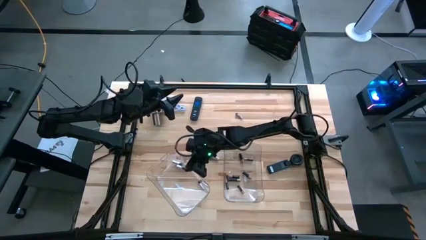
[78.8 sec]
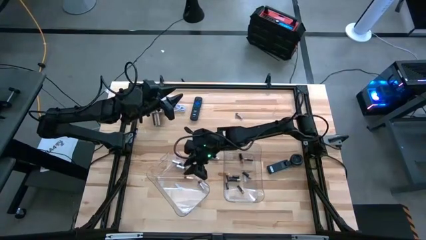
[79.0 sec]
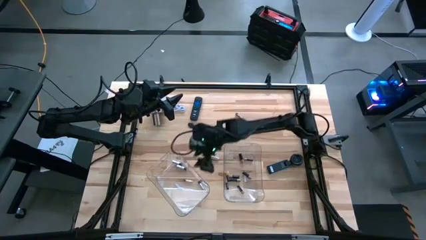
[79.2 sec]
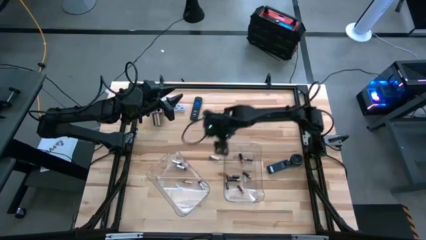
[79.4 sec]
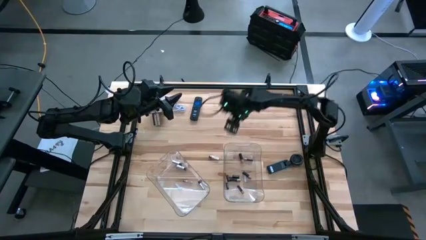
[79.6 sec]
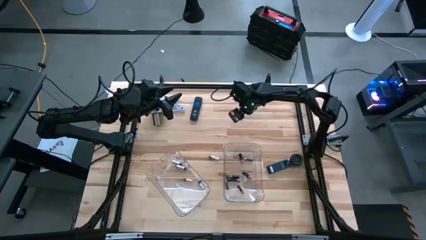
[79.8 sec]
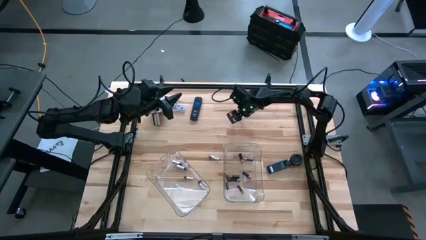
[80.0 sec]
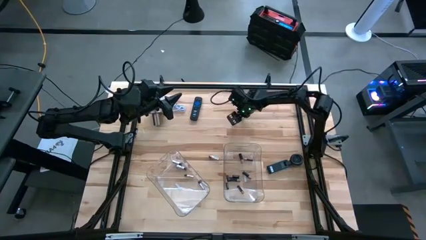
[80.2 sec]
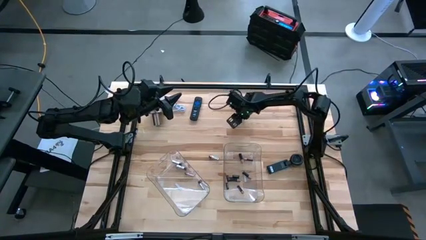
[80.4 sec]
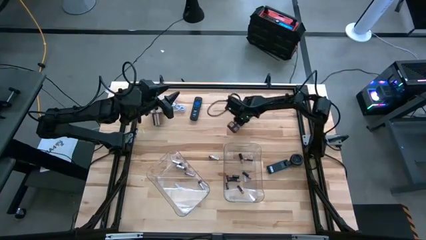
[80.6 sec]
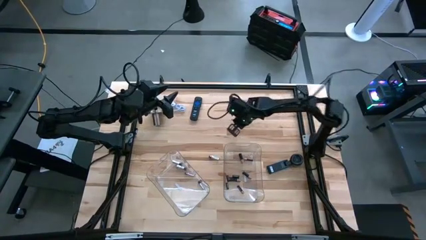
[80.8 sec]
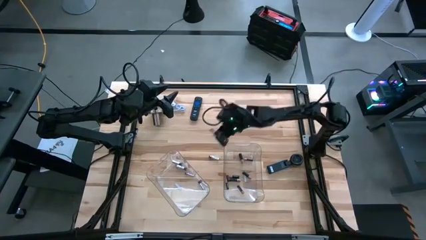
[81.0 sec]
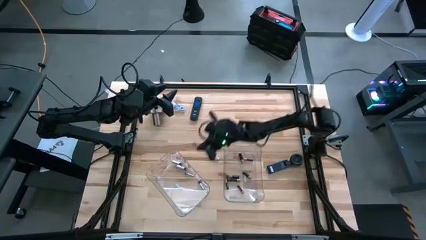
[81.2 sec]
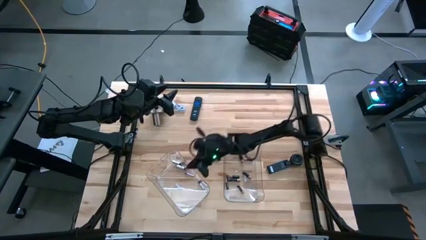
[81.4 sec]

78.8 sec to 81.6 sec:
Task: Sort batteries
Put the silver battery into the left transparent bin

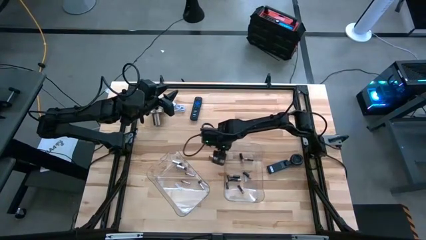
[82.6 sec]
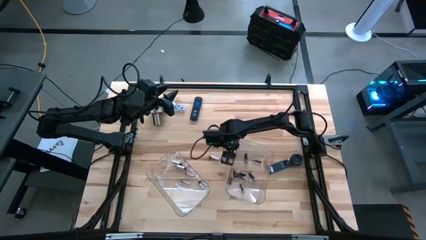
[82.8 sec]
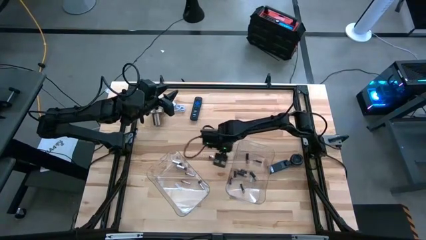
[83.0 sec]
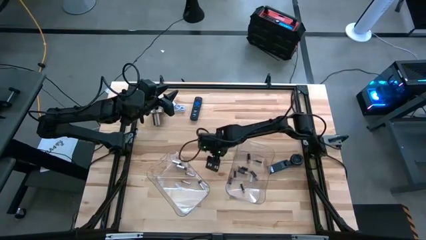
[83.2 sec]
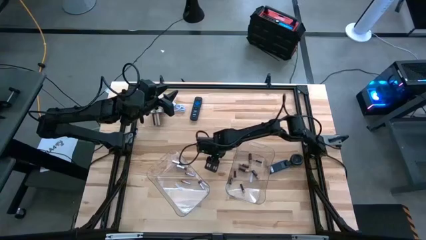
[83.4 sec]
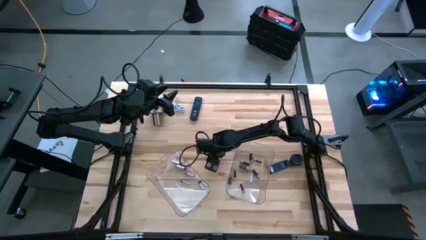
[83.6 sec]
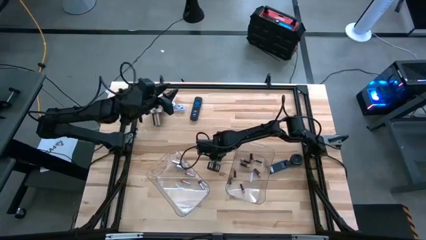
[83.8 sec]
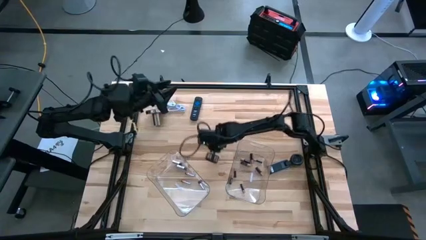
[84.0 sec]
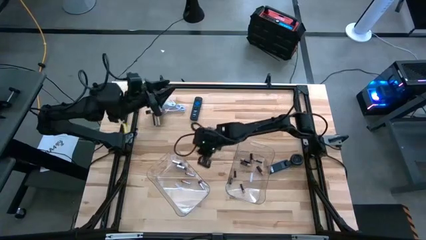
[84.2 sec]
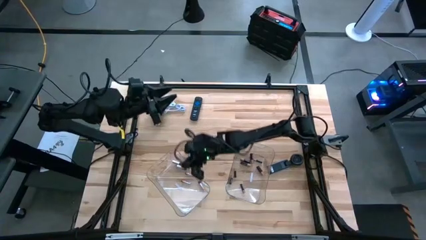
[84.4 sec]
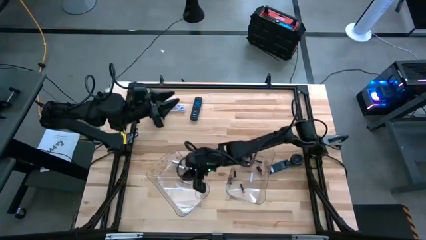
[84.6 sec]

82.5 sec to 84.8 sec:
Put the silver battery into the left transparent bin

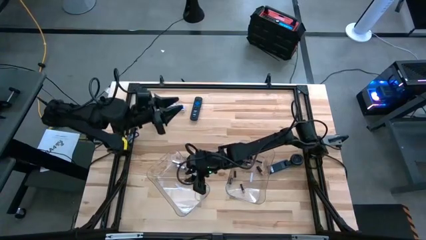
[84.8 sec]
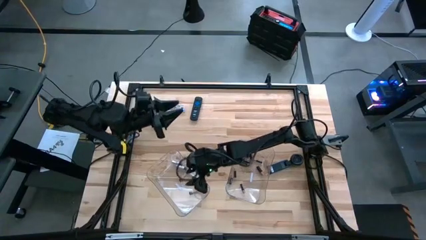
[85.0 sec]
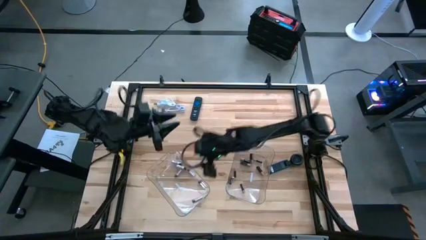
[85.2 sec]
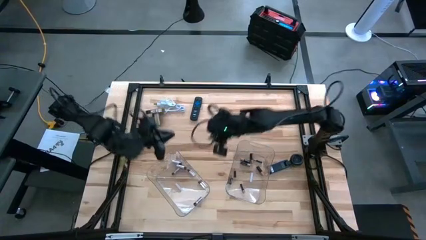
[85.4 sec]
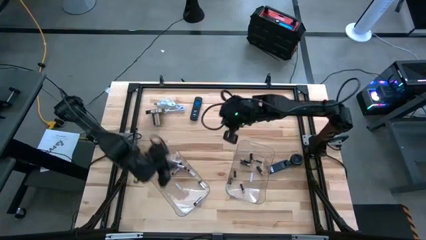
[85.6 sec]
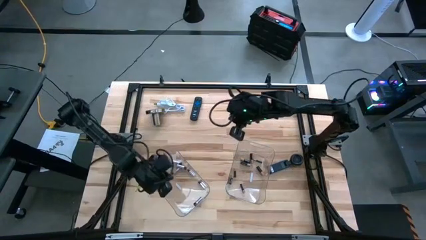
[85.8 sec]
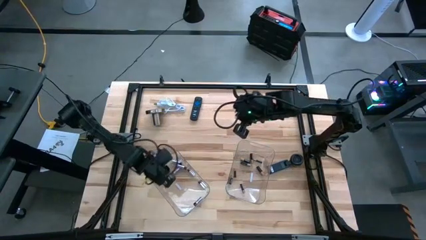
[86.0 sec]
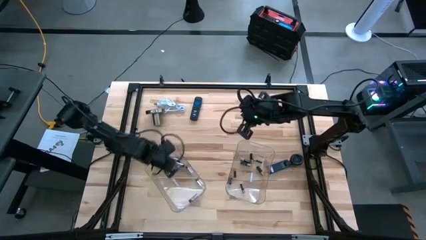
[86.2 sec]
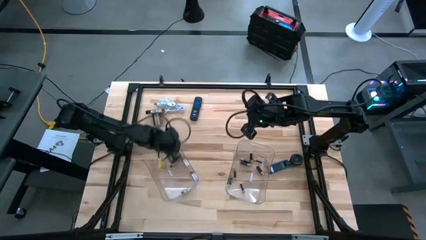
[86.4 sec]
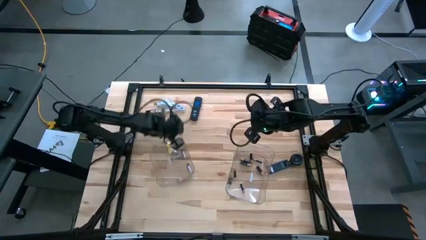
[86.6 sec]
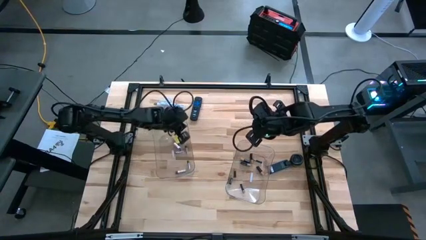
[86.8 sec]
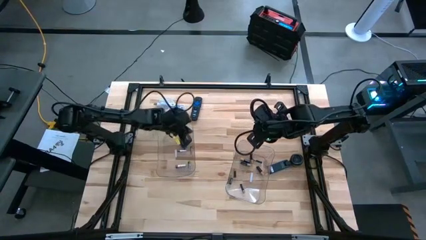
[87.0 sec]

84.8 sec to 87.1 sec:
Move the left transparent bin to middle left of the table

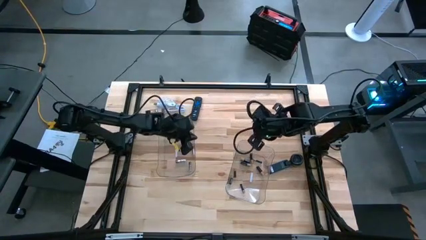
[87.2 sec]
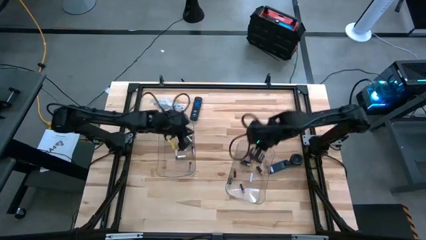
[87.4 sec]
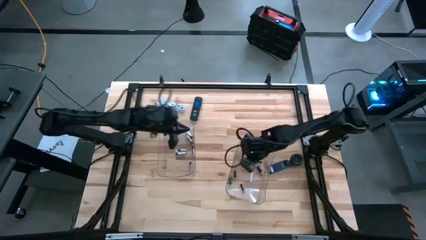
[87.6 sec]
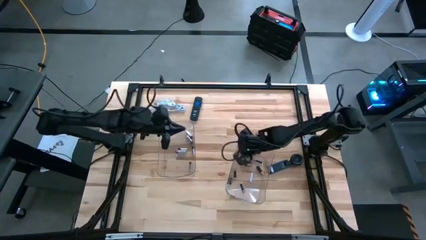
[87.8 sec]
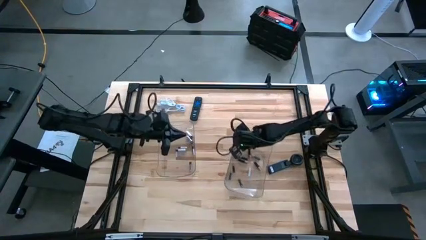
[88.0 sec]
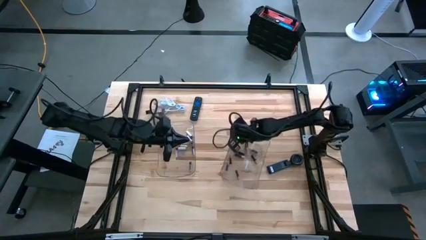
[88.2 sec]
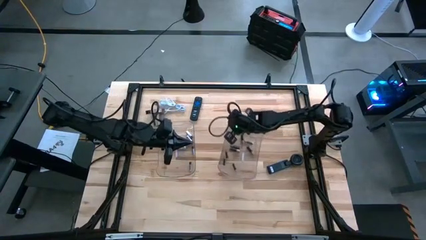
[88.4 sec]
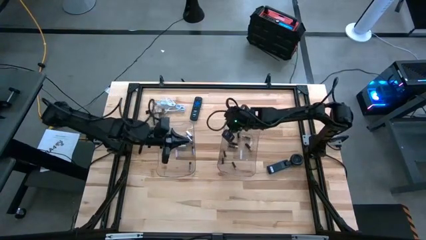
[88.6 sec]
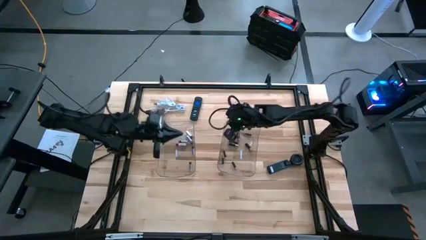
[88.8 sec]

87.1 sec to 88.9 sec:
Move the right transparent bin to the right side of the left transparent bin

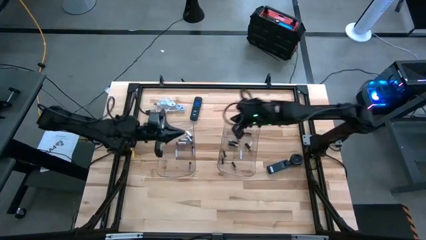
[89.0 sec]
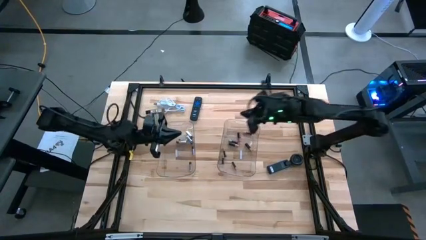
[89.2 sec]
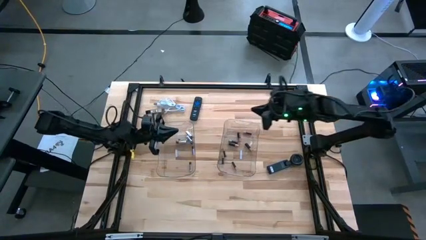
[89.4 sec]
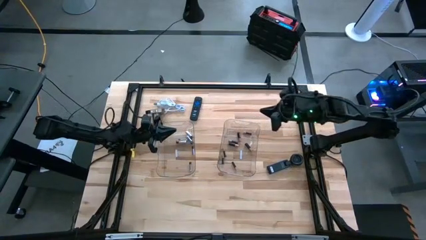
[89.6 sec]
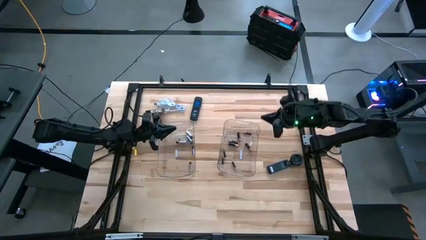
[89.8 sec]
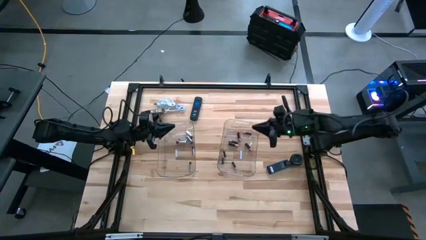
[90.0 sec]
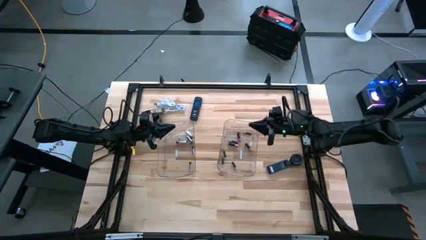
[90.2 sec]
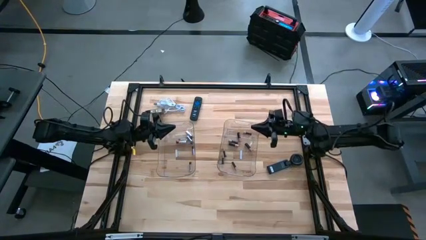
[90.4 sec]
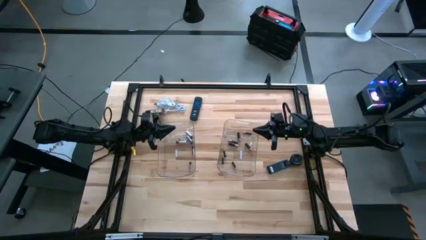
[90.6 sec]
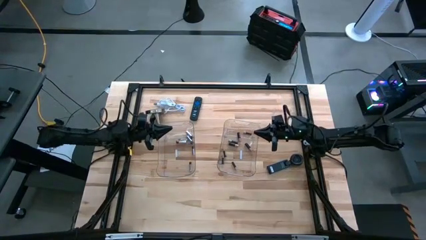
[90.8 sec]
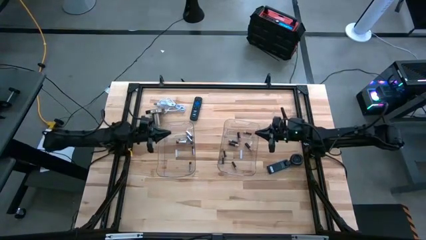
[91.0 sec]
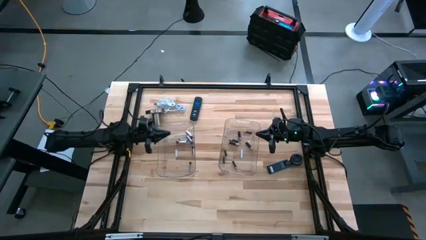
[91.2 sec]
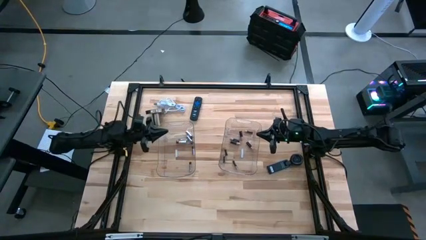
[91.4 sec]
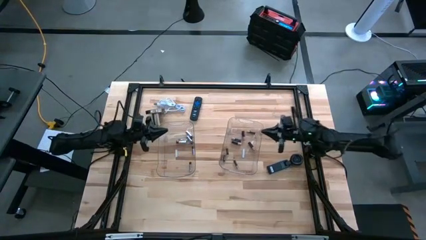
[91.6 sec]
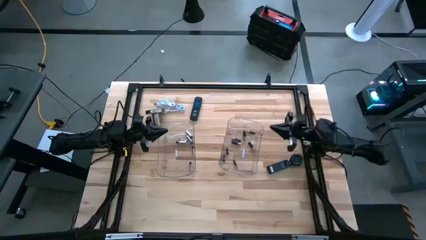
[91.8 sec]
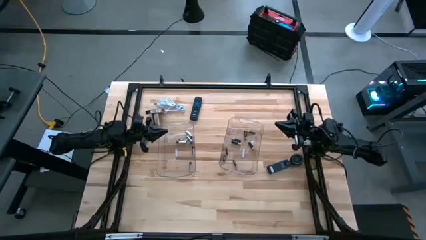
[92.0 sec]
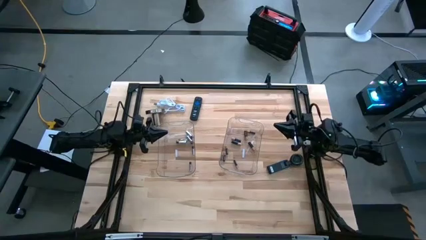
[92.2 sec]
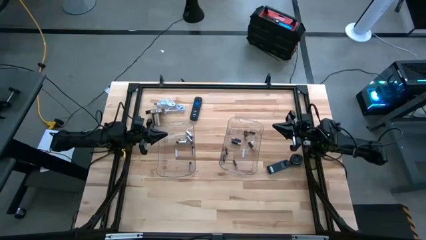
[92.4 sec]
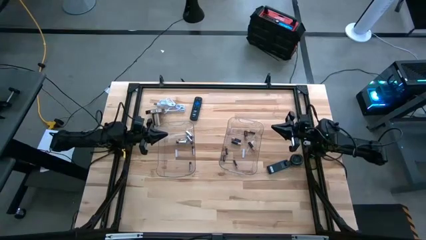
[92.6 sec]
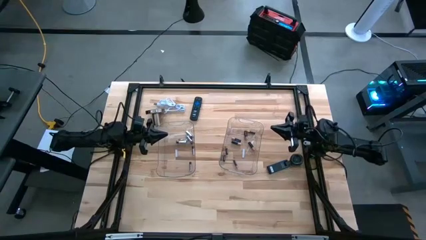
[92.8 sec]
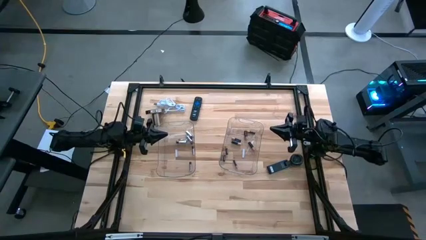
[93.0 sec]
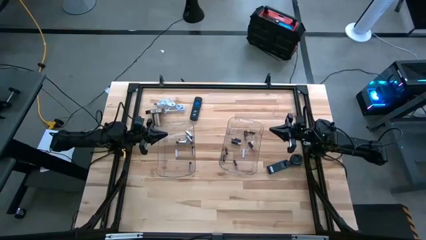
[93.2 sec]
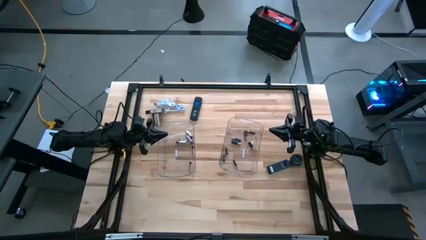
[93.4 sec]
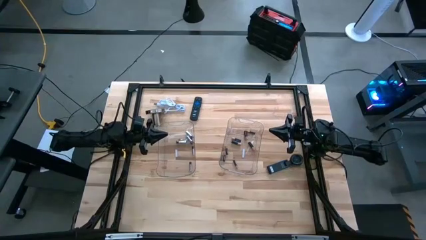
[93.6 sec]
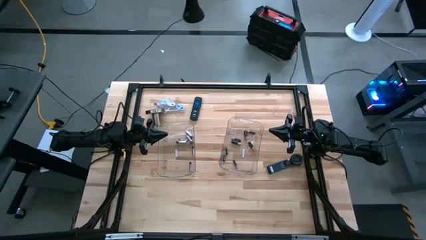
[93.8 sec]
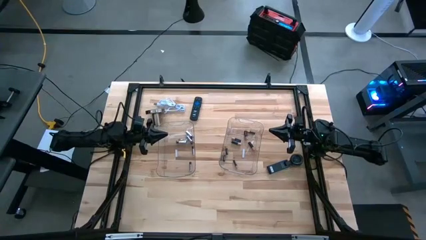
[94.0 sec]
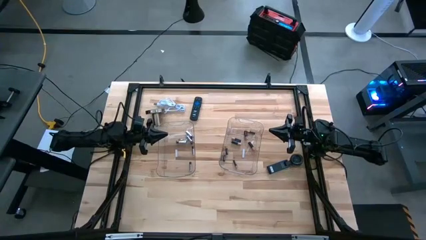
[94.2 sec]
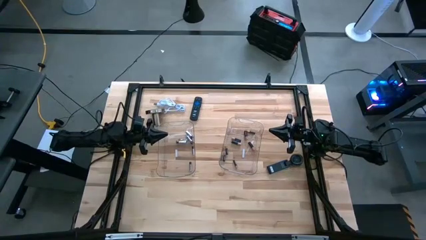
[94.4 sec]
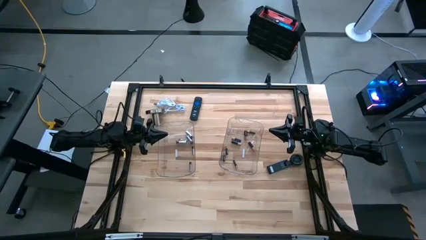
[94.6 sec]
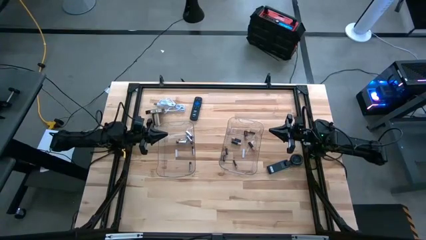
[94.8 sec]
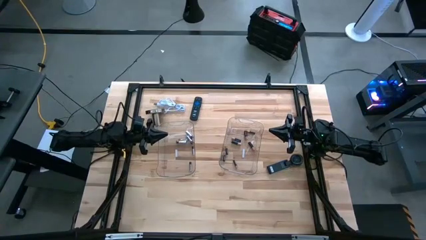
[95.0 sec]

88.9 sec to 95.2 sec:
Return to Home Position

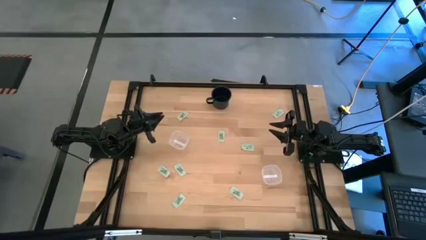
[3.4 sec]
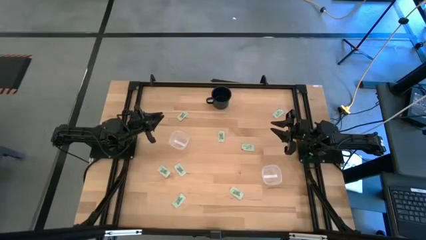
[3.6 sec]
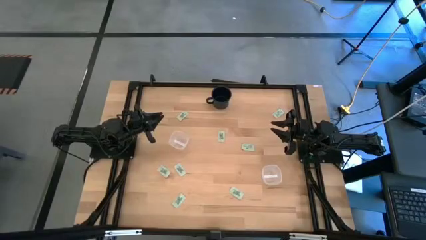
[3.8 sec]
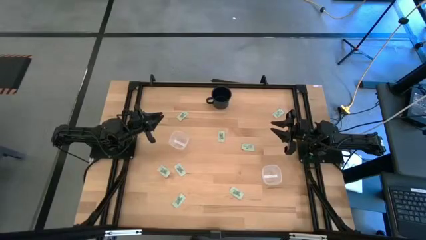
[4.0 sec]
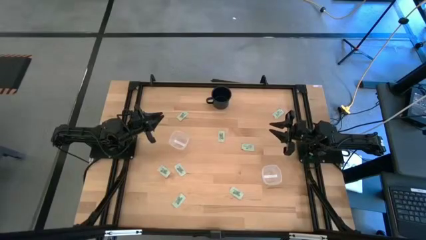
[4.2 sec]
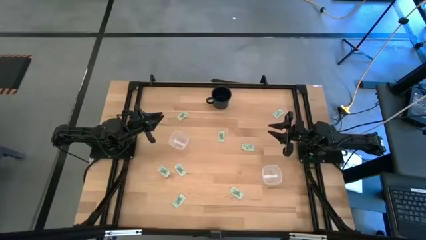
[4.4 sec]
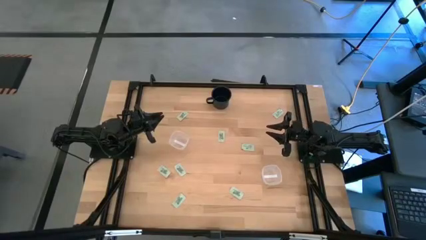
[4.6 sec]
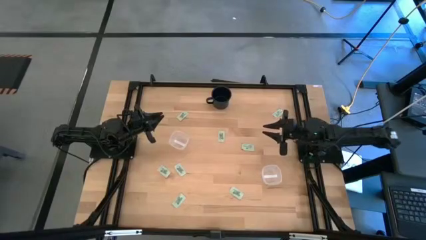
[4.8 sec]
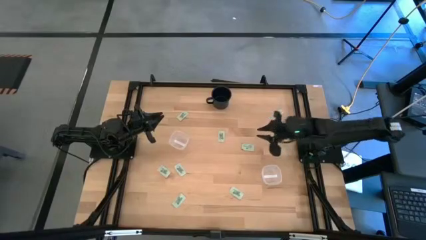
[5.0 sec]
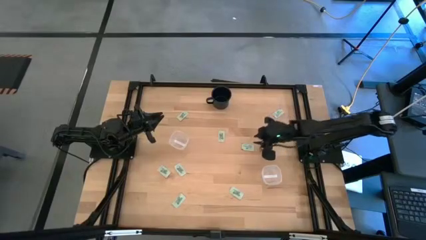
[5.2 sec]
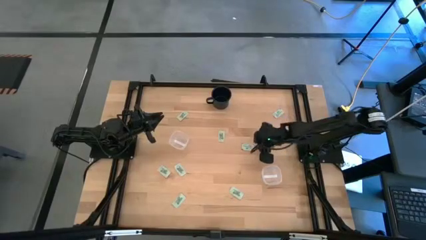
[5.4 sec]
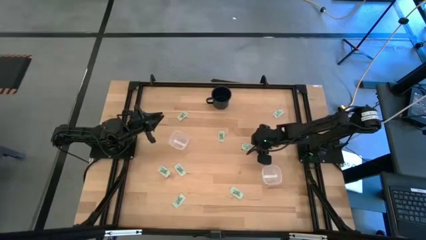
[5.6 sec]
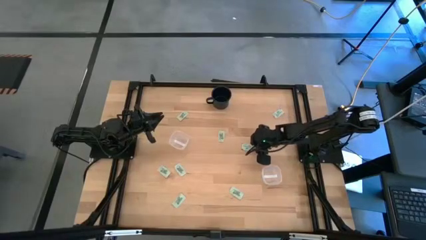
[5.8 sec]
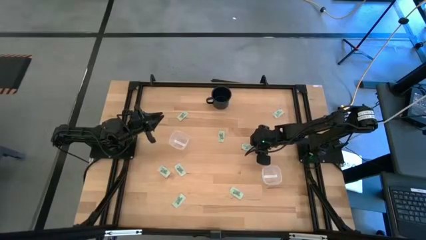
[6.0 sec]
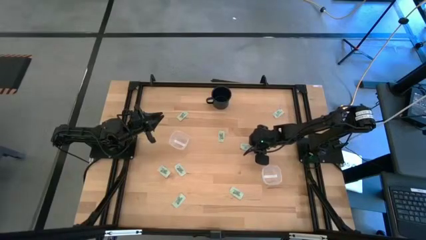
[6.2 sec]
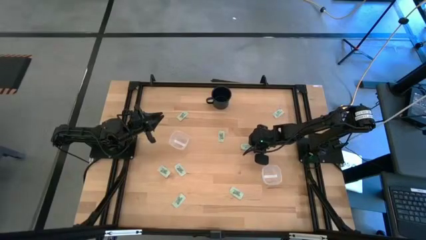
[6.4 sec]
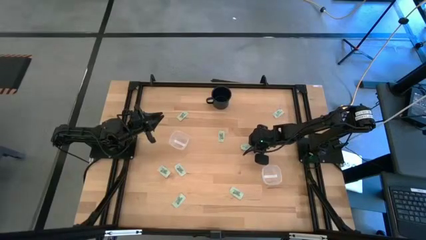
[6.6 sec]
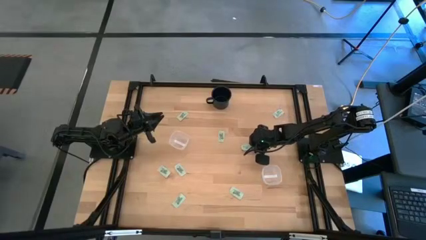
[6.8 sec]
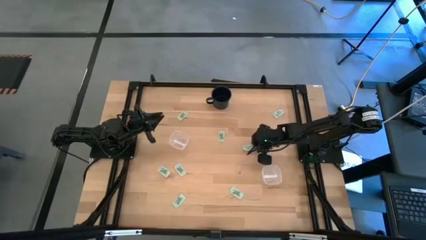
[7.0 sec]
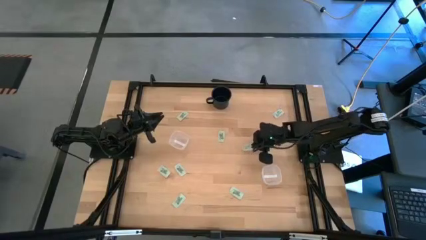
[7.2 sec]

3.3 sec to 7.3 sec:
Task: Pick and place items into bin
Put the white stevia packet into the bottom transparent bin
